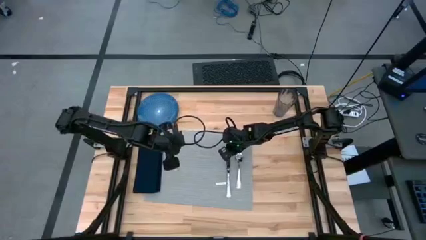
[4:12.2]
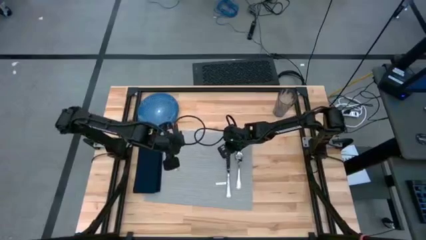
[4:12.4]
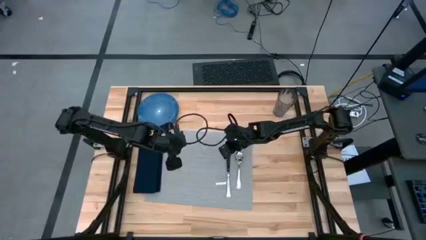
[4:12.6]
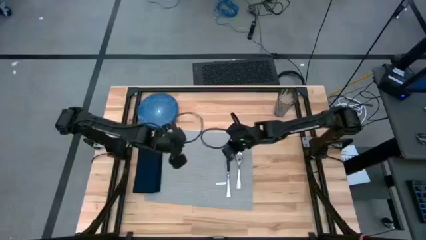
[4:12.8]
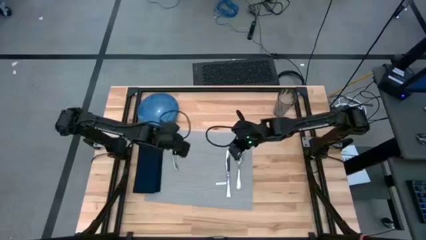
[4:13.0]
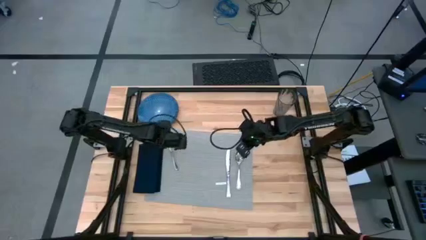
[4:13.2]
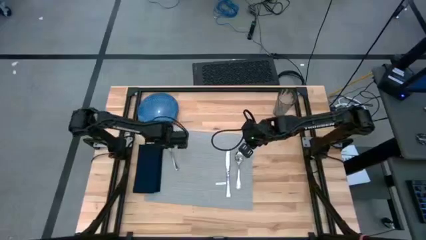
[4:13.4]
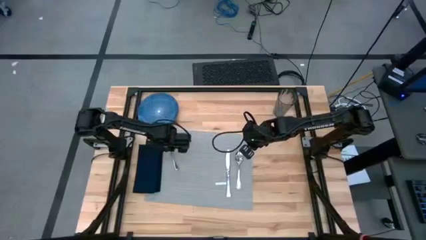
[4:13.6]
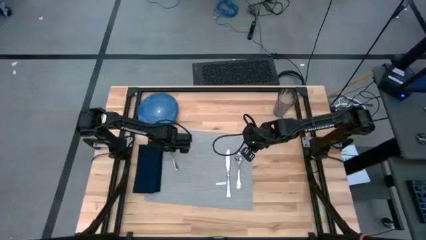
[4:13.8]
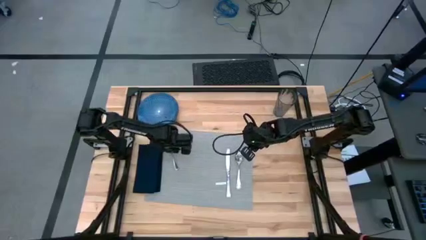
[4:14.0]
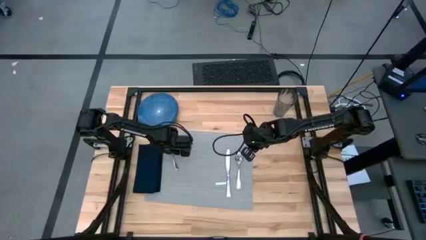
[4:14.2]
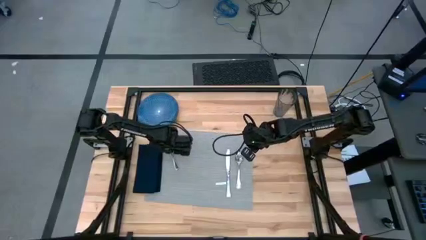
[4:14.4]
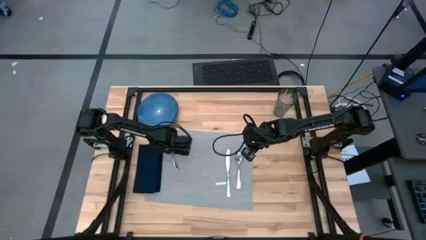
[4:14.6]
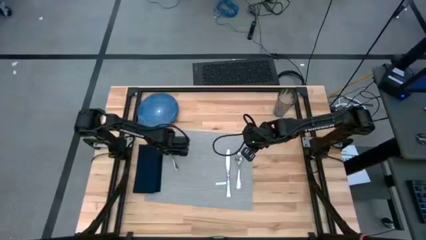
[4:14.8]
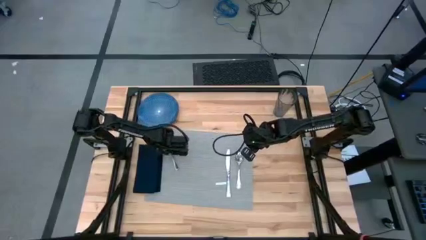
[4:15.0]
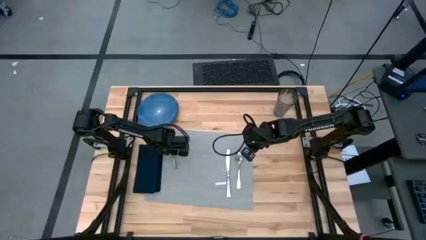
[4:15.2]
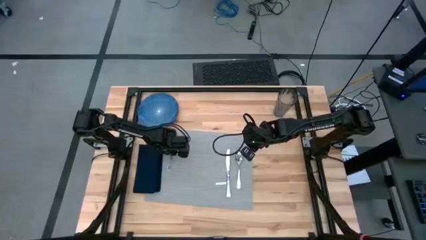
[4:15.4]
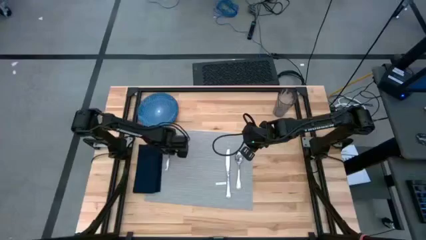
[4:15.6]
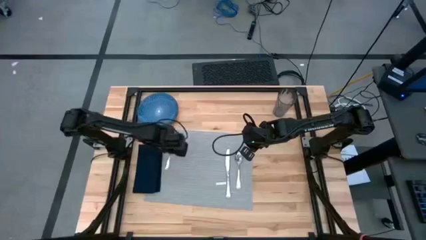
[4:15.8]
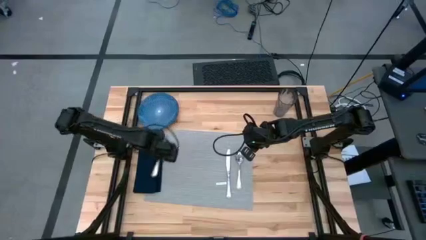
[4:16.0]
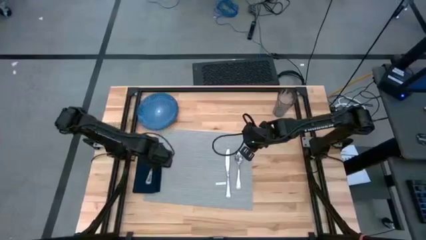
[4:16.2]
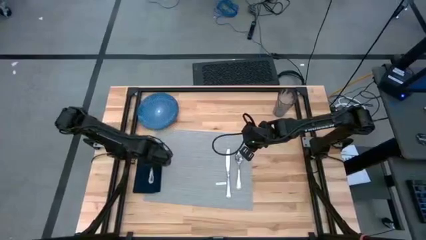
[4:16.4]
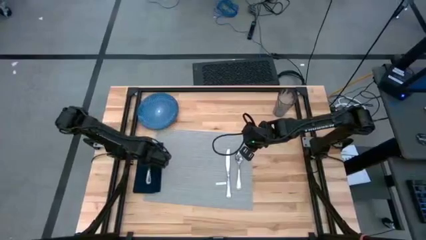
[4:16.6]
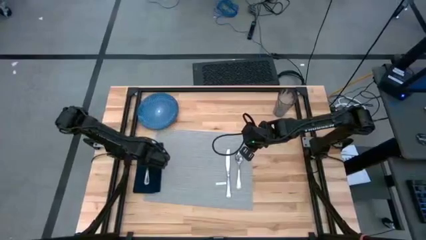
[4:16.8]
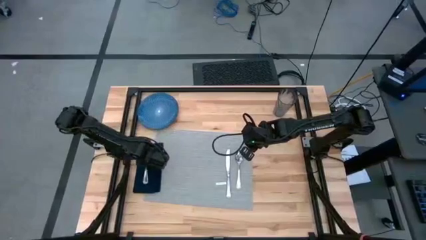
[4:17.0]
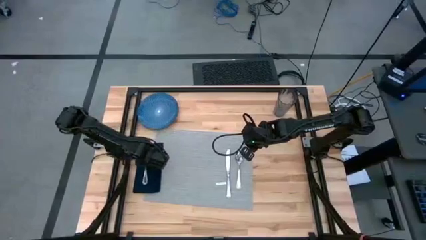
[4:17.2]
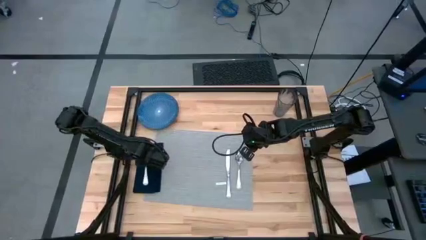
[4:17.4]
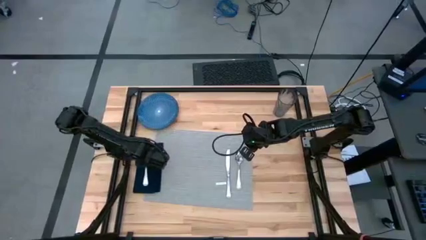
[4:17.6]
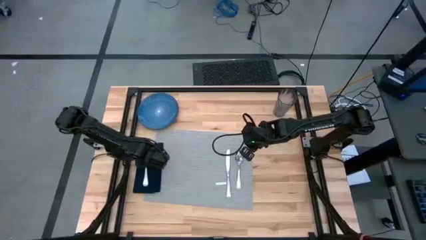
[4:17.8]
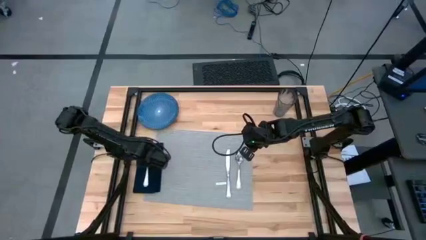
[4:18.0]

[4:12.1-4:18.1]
Task: Set table place
Put the silver fork on top of the folded blue napkin

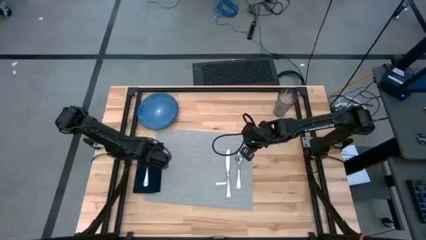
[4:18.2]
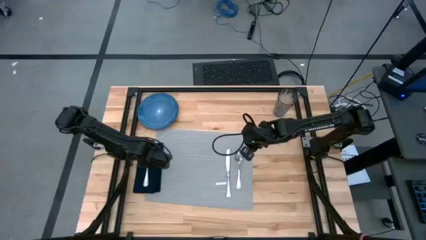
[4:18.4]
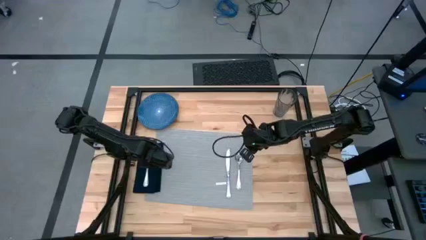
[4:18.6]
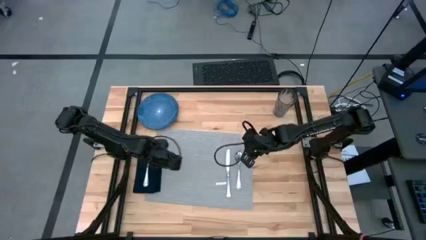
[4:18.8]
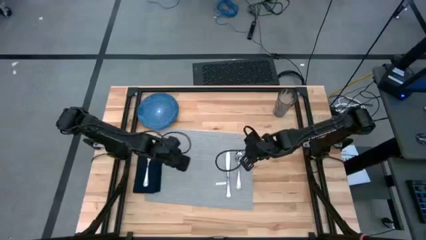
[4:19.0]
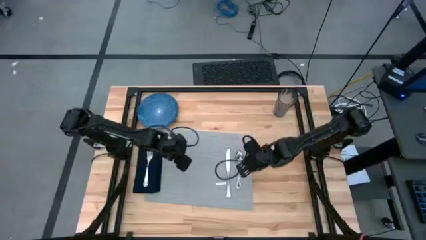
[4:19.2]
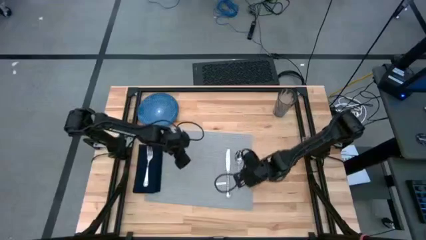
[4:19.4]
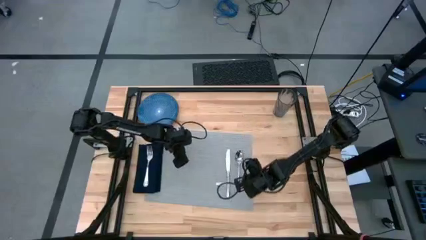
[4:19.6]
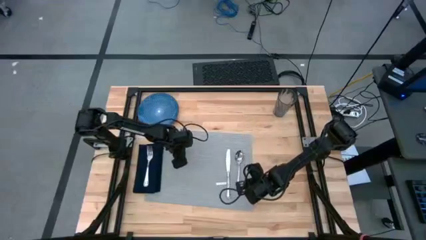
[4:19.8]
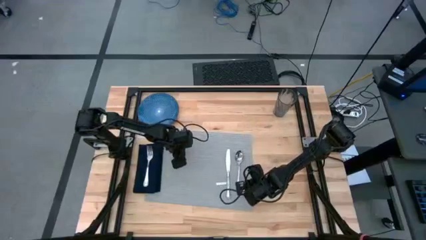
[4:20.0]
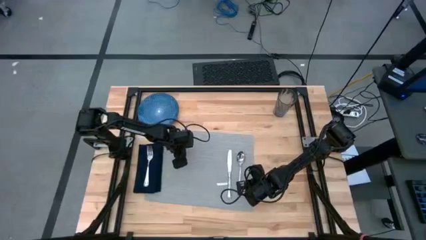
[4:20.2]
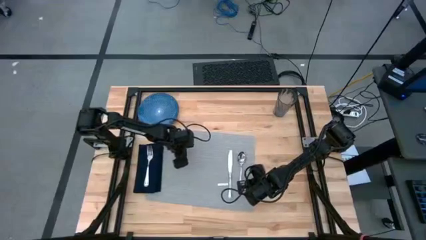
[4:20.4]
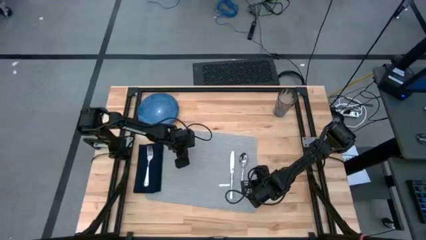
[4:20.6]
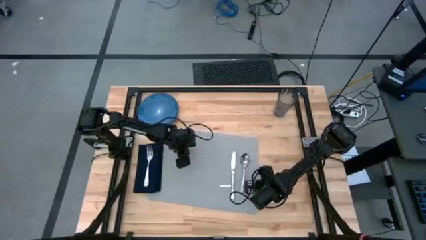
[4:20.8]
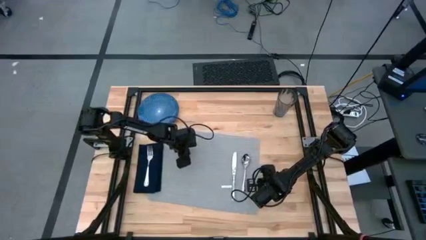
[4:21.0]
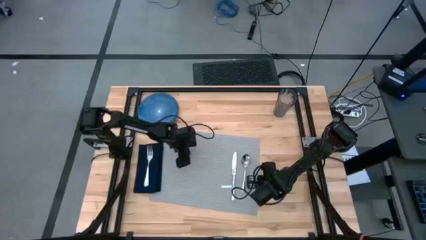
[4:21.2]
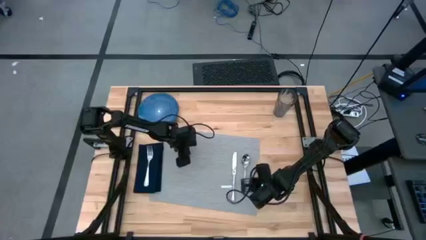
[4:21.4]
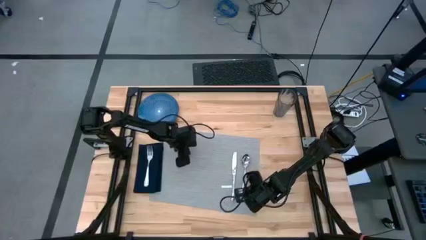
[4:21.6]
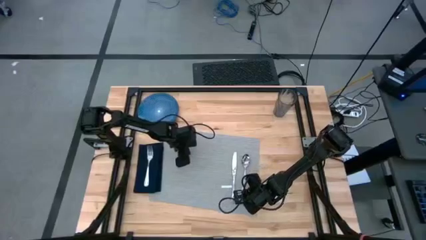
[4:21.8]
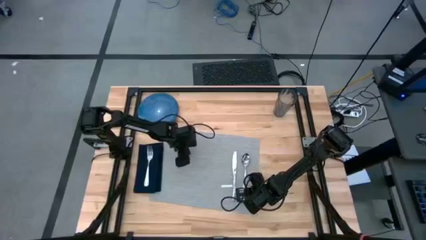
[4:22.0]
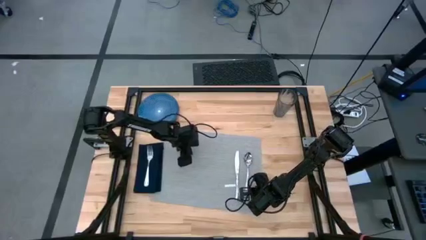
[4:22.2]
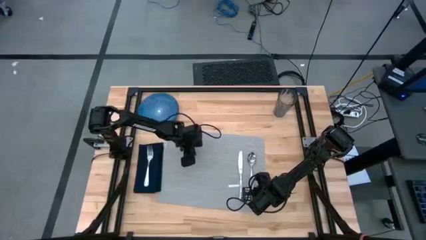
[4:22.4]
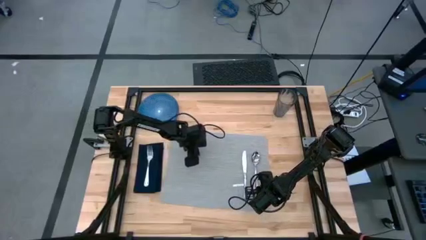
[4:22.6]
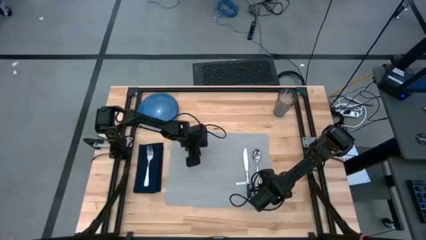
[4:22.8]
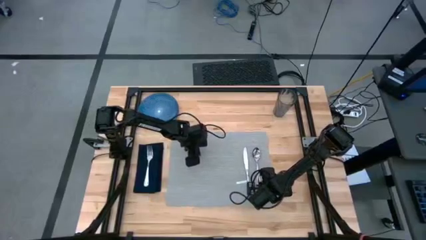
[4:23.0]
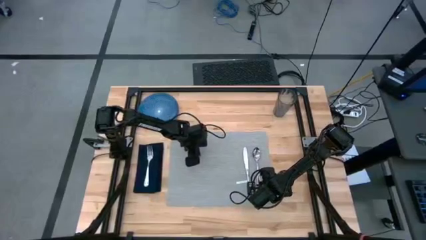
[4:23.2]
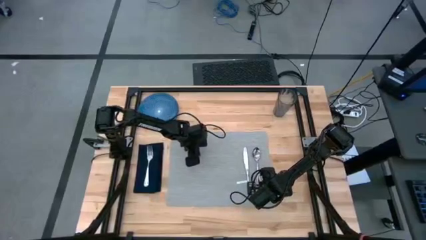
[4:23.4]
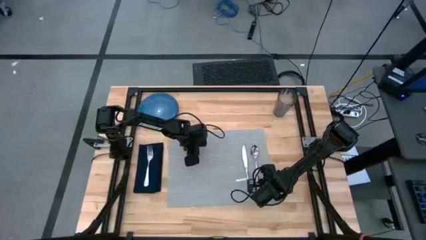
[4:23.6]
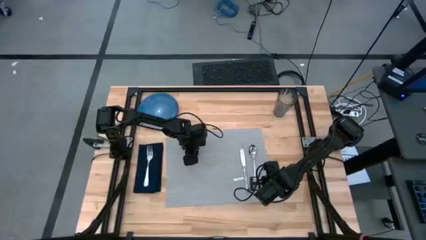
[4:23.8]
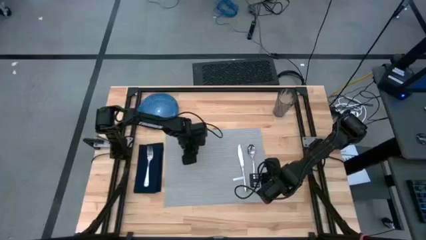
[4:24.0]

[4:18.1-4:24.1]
Adjust the gray placemat

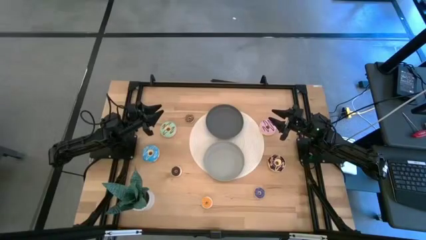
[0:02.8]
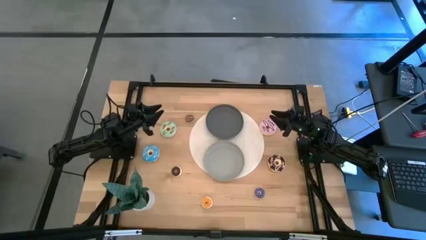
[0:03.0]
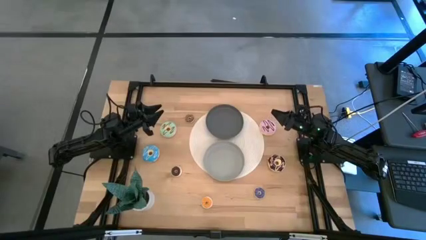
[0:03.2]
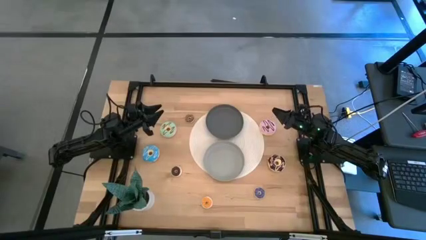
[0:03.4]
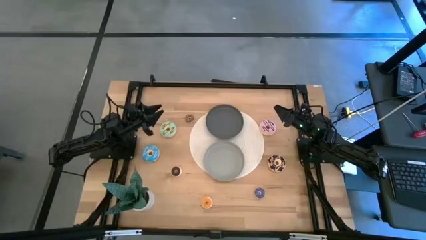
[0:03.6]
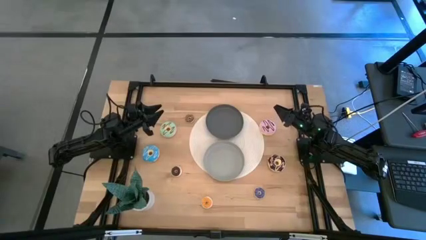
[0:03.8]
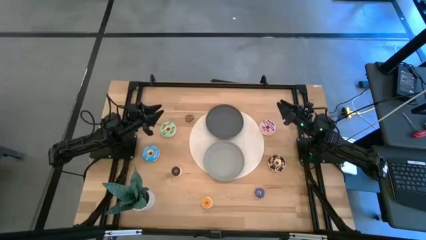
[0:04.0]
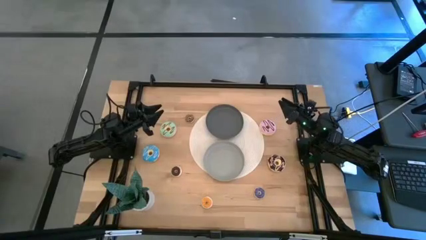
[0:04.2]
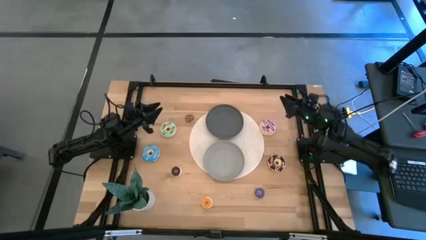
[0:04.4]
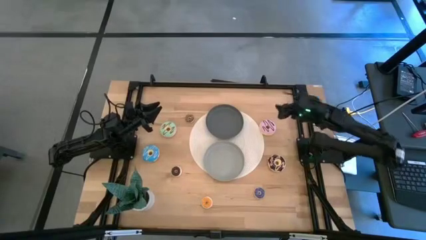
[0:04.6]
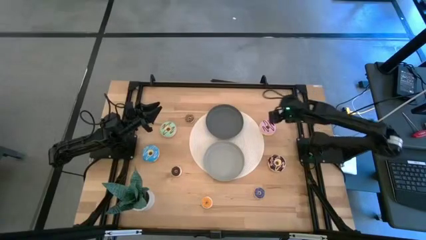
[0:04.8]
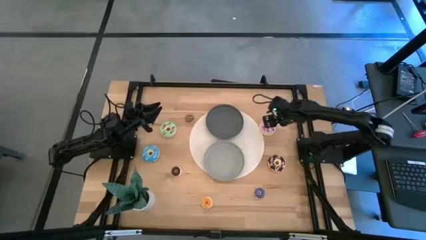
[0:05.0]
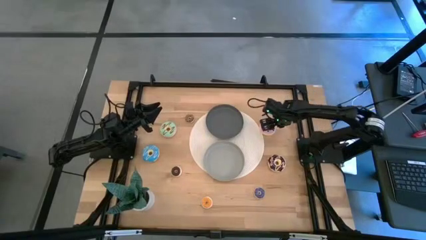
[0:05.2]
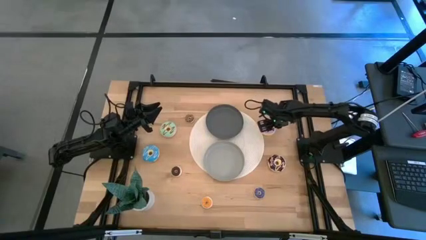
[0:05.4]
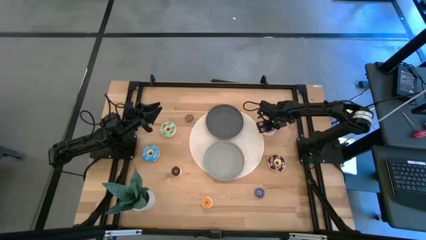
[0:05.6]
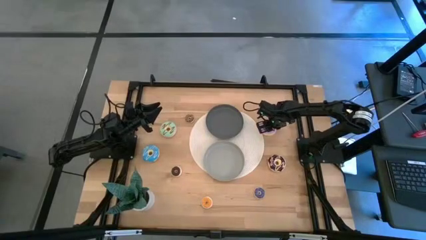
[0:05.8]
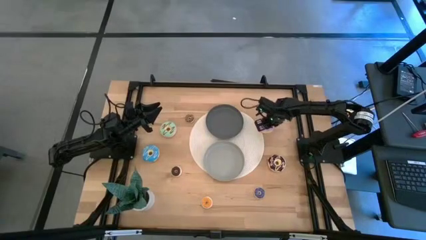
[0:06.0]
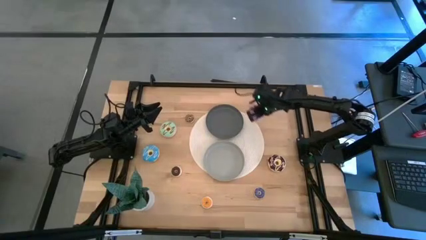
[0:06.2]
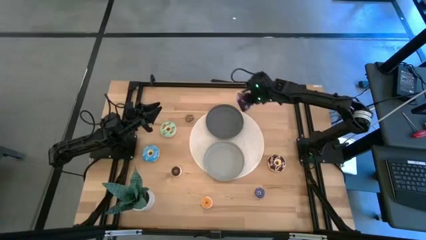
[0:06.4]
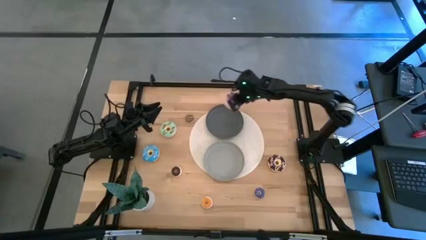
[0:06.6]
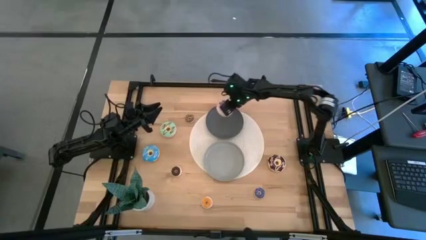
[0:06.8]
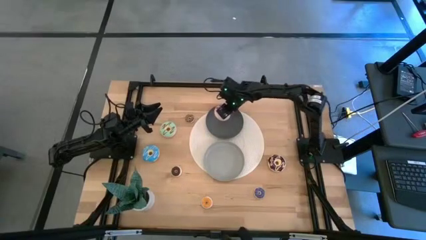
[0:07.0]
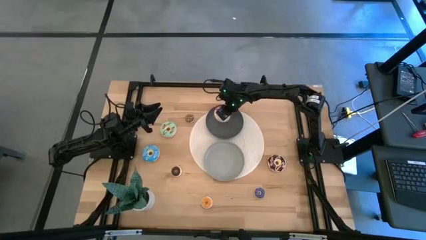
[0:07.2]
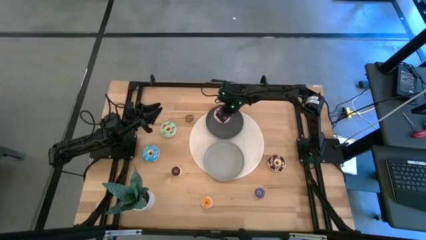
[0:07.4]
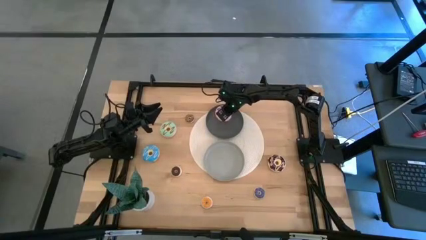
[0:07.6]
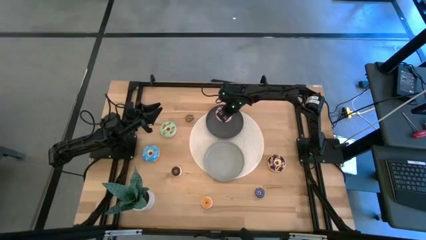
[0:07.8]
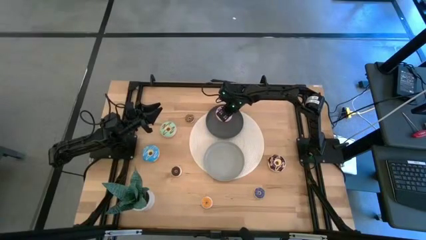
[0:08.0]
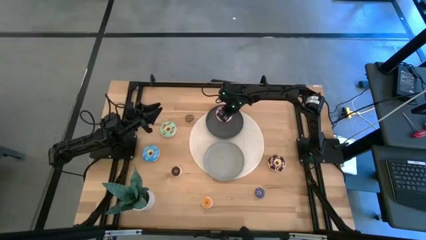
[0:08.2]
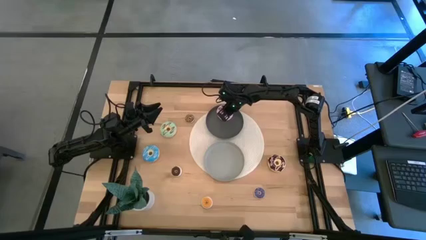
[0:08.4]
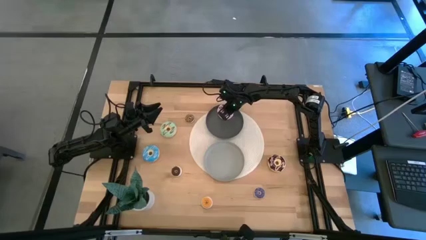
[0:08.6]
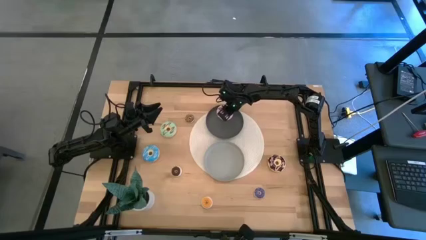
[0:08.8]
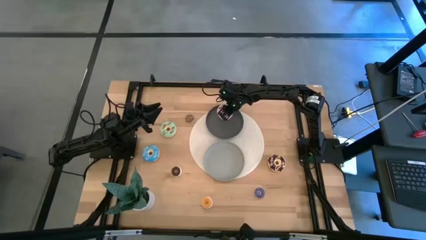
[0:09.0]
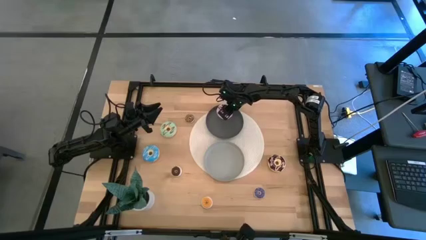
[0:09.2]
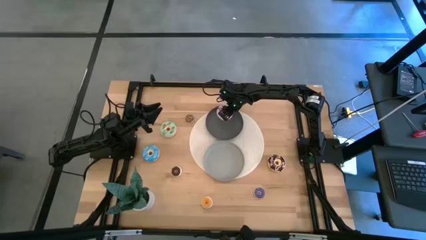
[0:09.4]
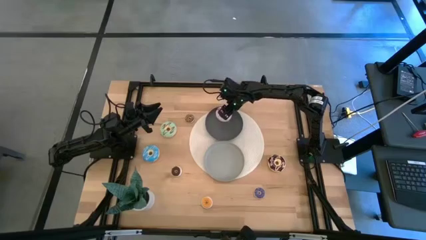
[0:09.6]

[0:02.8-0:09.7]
Task: Pick & Place donuts
Put the big purple donut on the black plate
